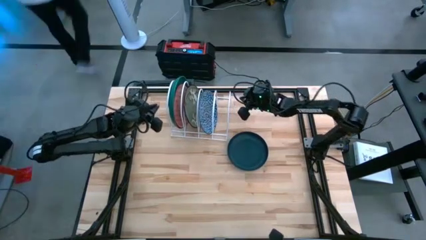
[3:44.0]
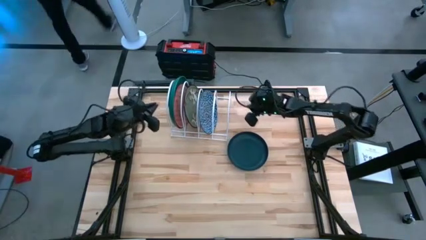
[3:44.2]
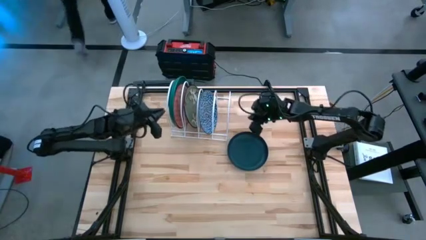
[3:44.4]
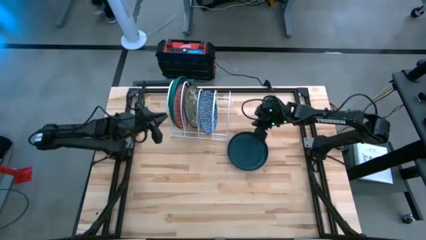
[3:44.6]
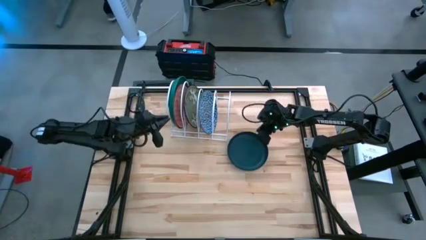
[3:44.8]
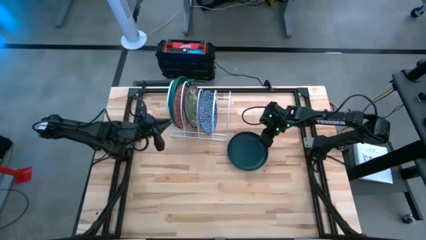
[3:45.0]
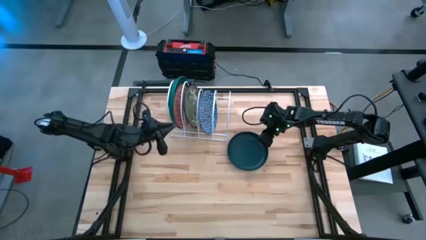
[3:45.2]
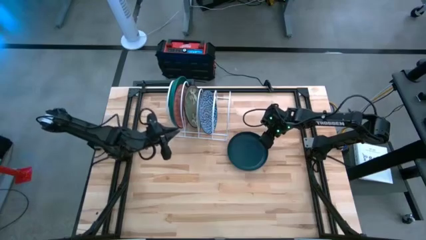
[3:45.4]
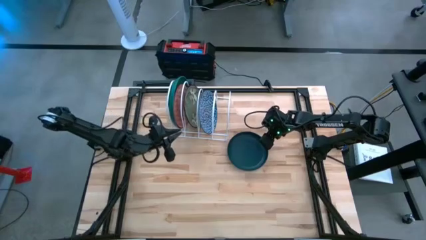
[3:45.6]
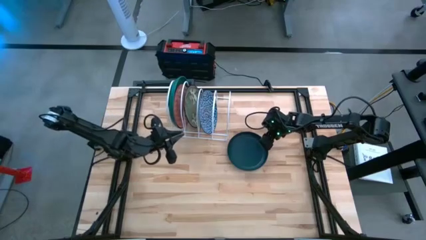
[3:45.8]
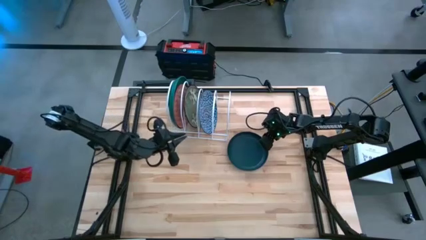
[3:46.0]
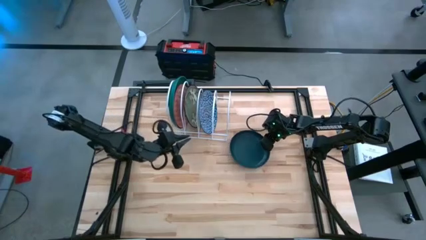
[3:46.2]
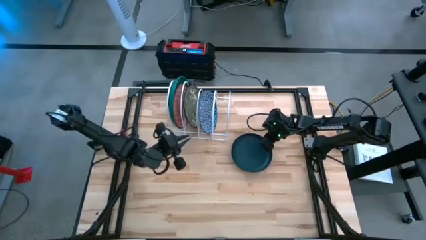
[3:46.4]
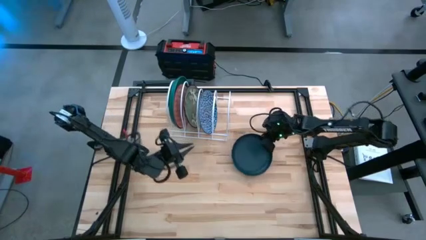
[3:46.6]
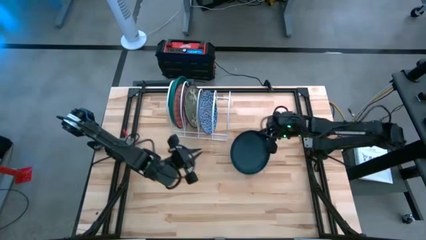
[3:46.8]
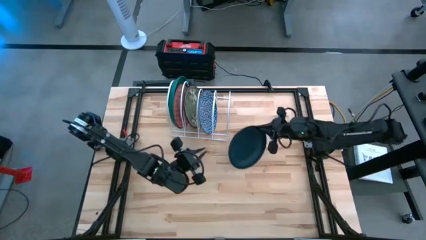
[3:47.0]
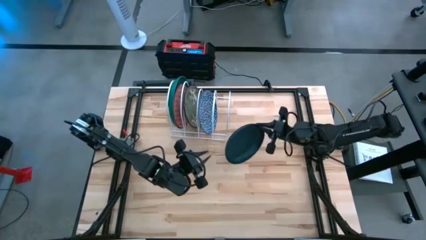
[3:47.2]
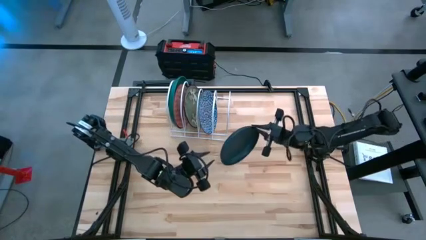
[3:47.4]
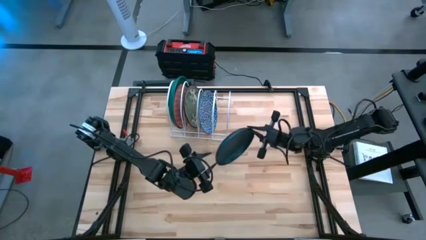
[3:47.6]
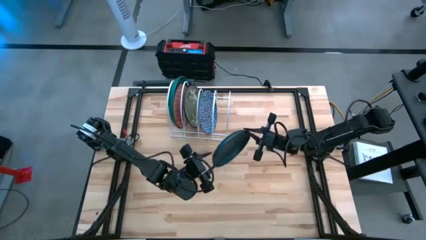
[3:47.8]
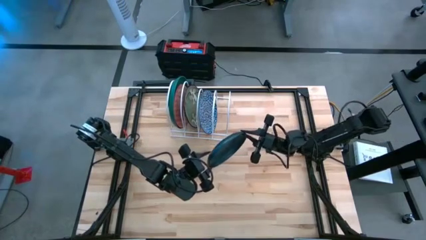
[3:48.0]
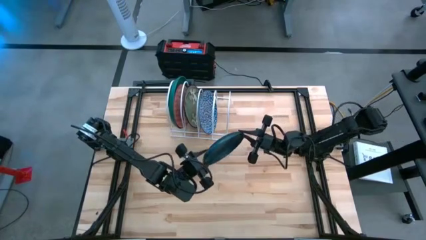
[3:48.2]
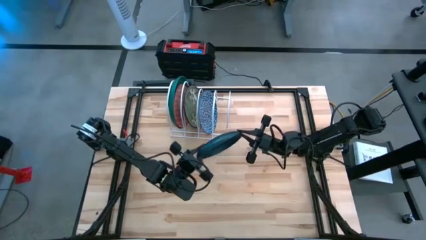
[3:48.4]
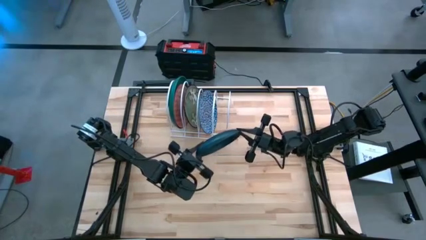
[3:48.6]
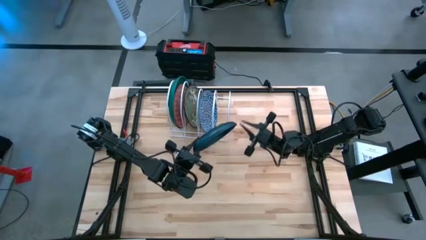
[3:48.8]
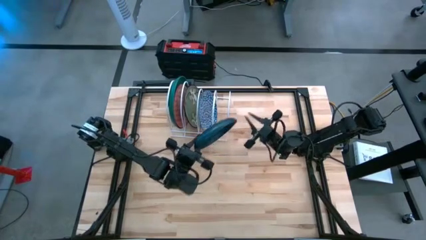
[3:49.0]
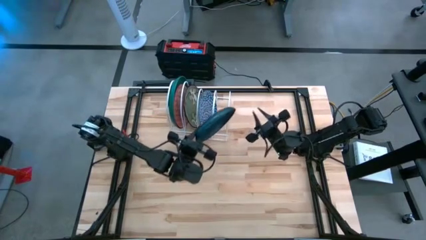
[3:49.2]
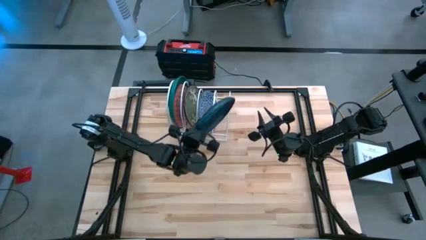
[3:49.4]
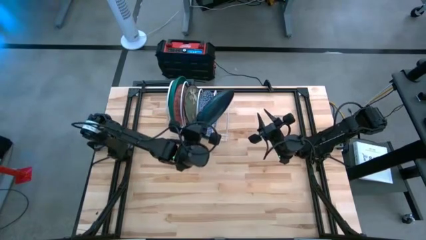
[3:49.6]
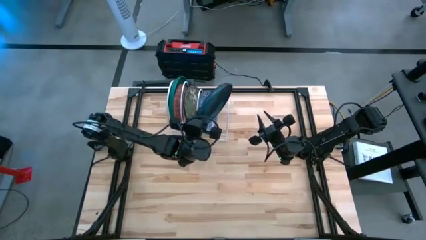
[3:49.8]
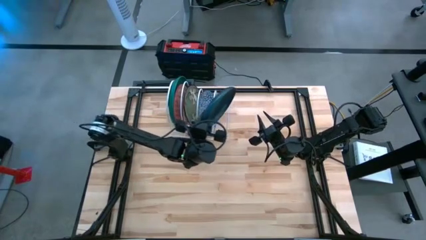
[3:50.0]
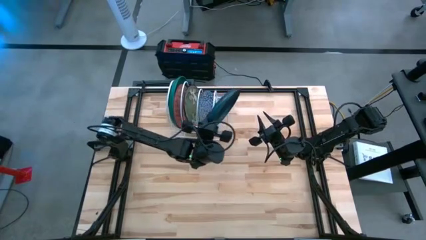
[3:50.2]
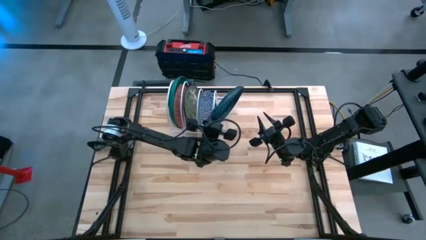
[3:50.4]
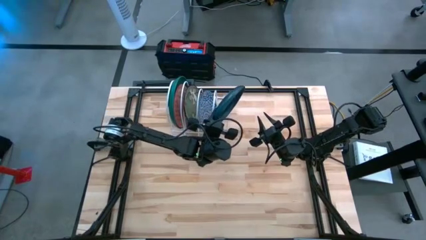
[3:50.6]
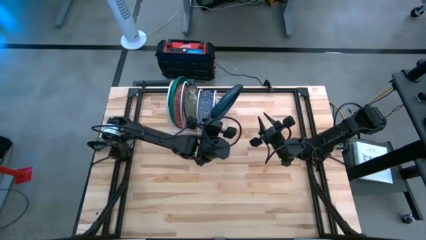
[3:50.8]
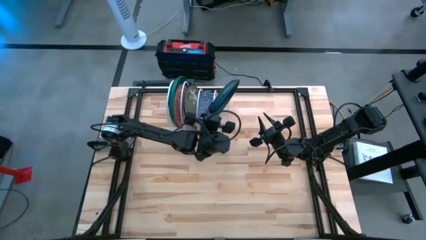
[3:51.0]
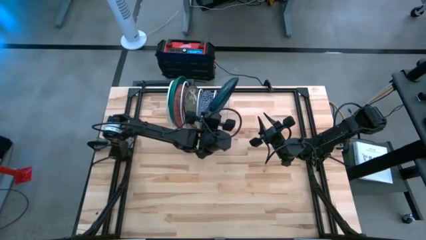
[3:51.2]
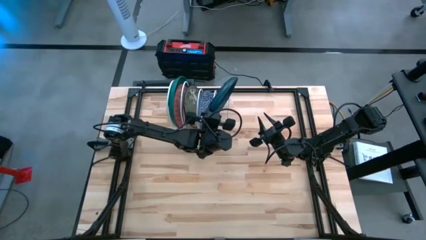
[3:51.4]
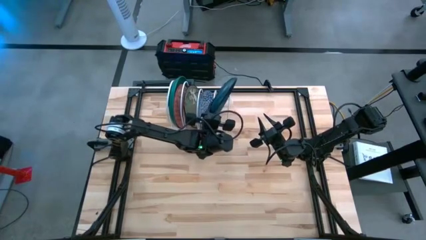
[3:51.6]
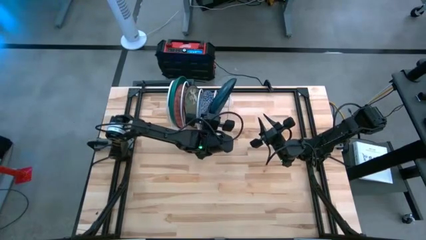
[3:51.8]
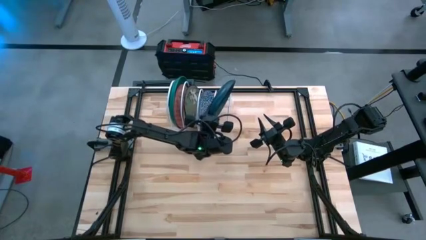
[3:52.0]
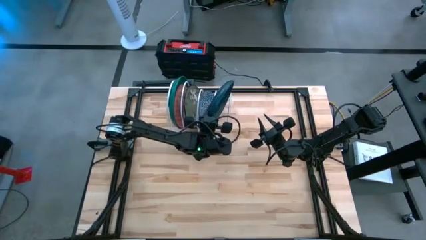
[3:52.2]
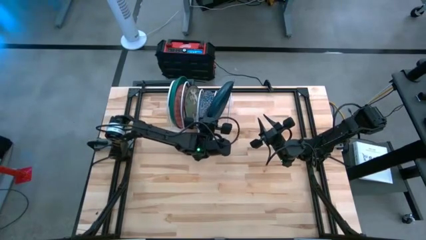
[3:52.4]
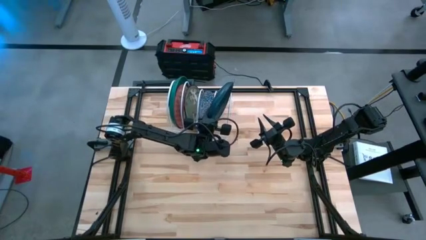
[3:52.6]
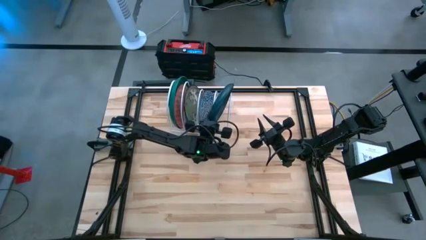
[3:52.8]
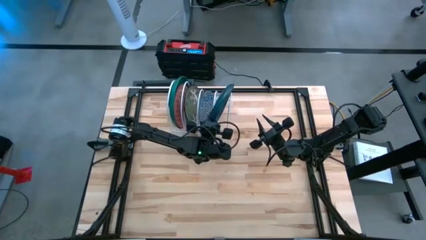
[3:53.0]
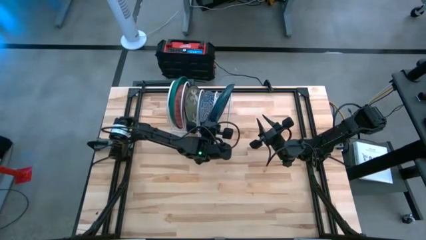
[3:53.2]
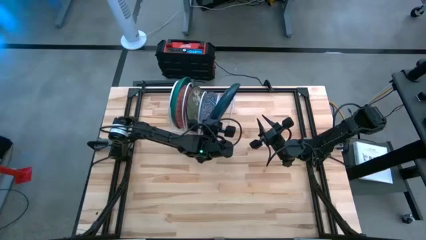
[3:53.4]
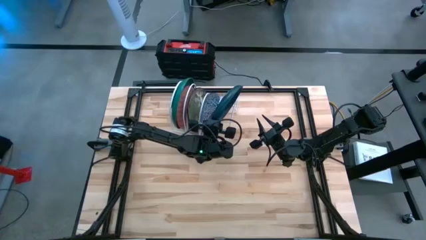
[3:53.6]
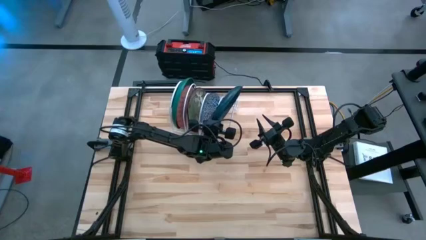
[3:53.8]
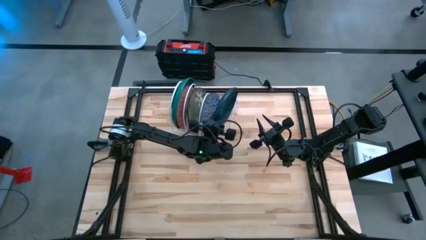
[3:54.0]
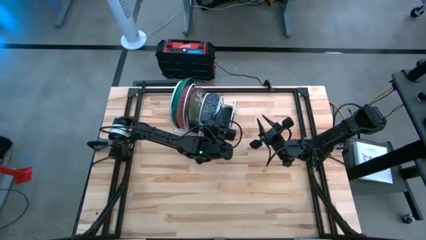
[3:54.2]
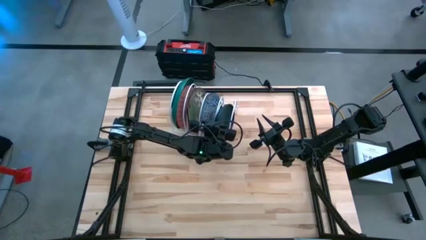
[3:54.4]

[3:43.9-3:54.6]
Task: Sort dishes
Put the dark blue plate into the dish rack

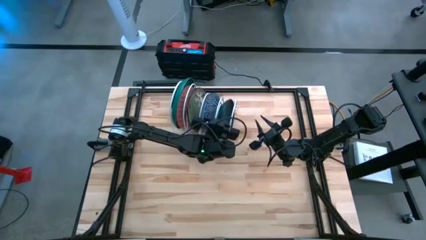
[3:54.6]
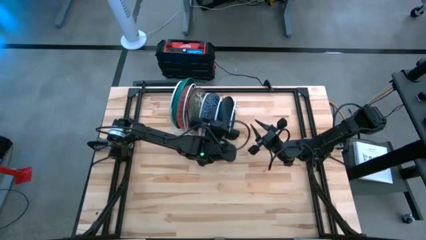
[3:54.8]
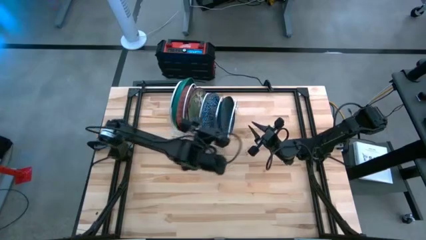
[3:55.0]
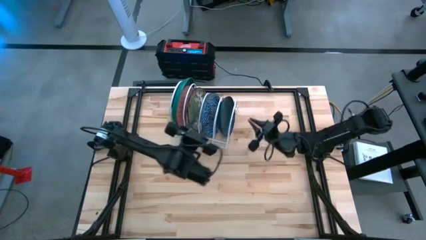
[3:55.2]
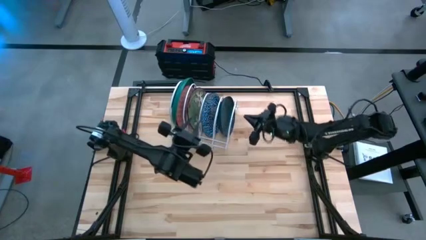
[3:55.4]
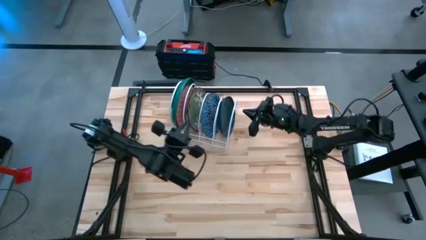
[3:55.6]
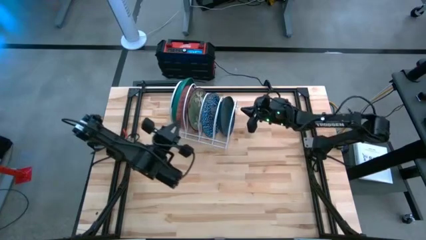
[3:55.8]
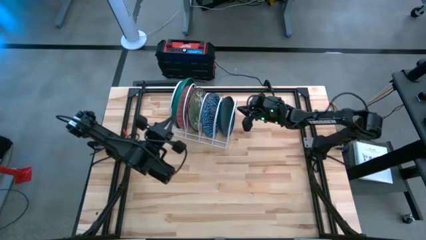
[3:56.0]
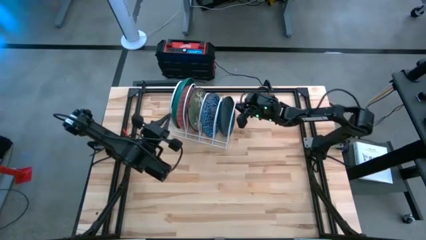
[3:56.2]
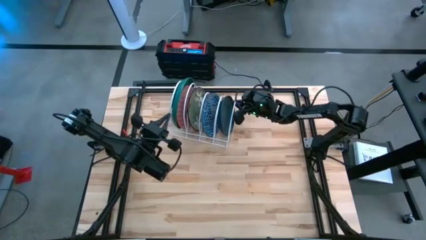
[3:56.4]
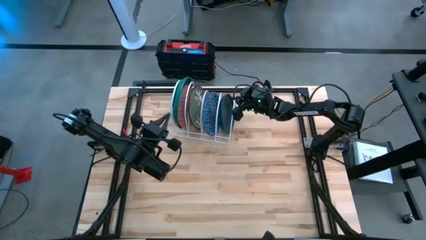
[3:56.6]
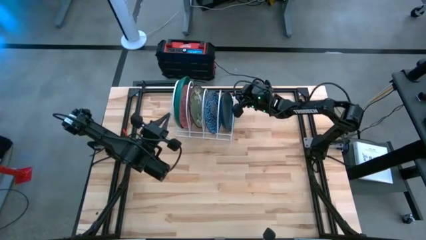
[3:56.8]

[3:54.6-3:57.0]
Adjust the dish rack
